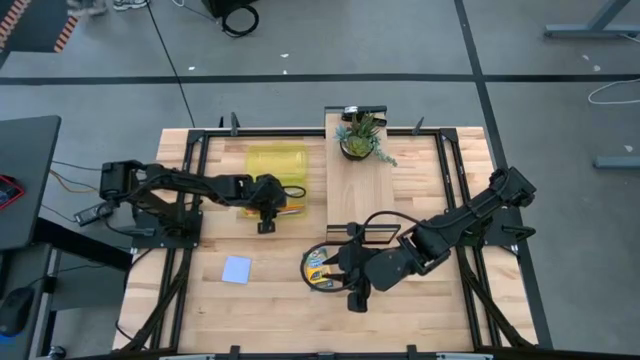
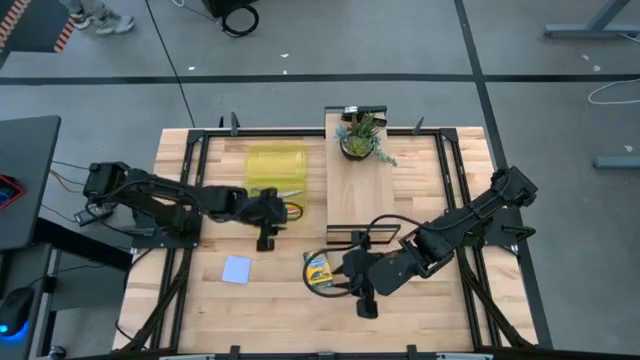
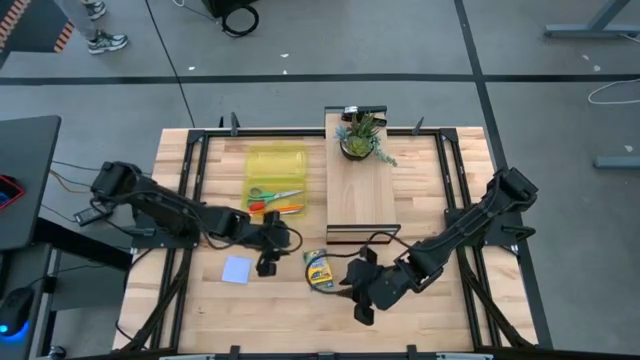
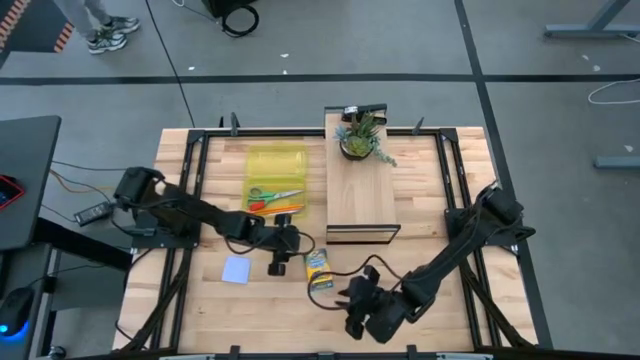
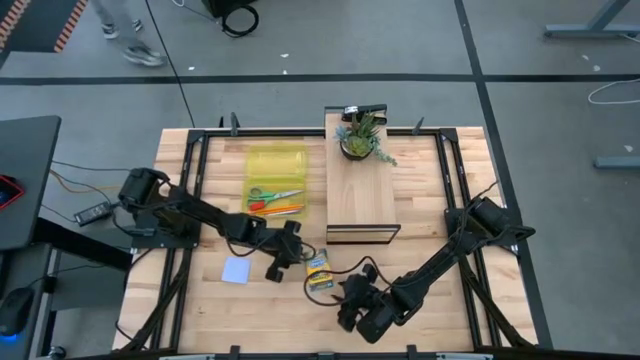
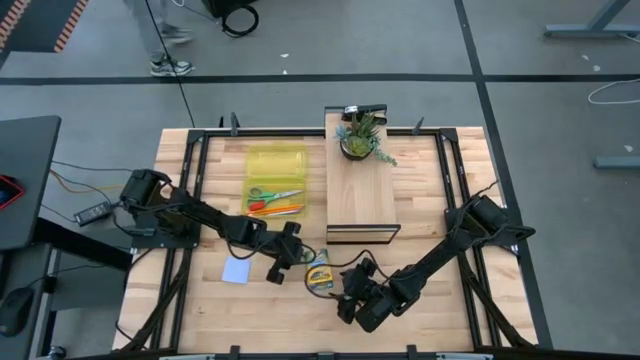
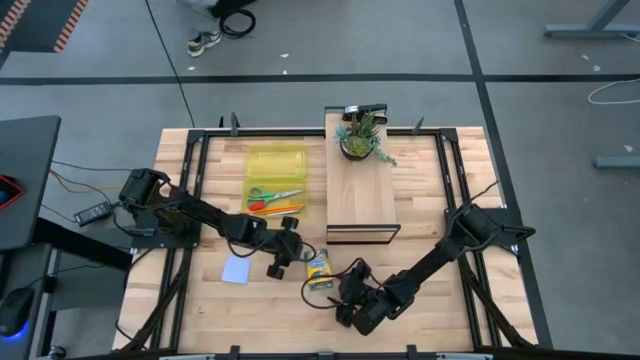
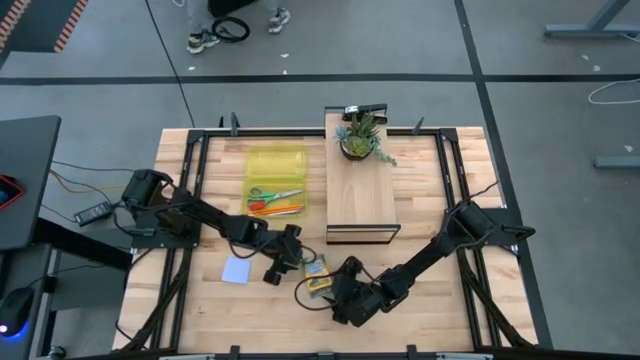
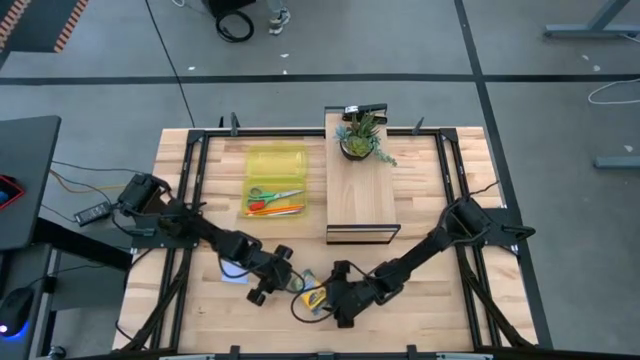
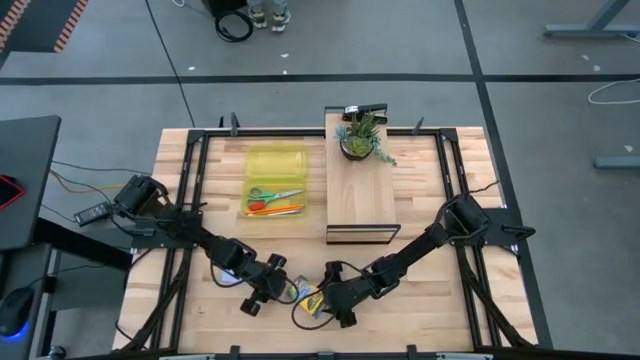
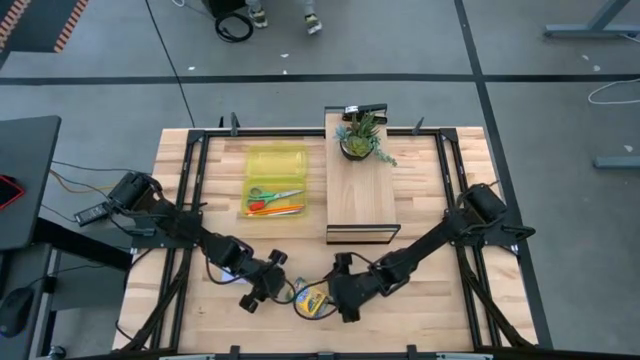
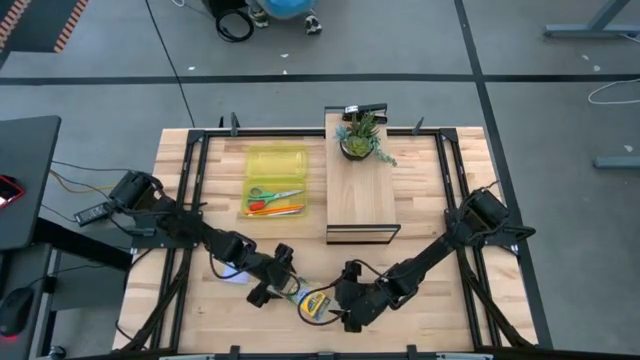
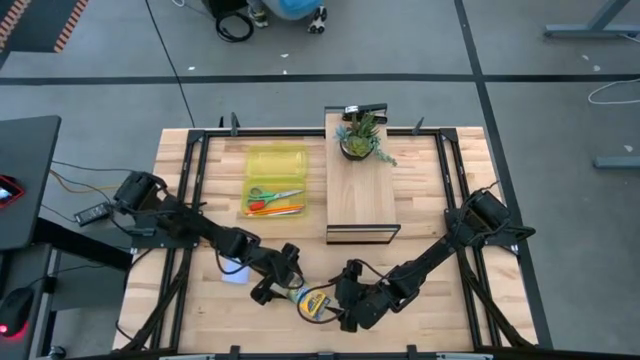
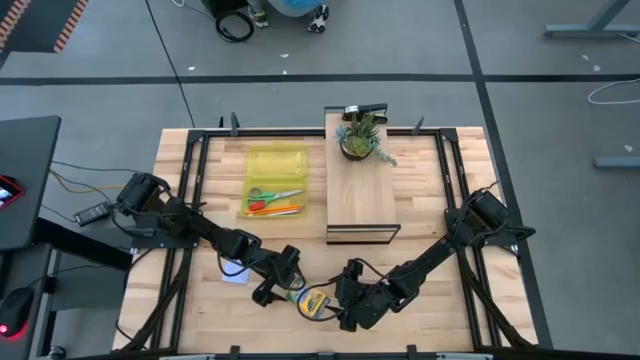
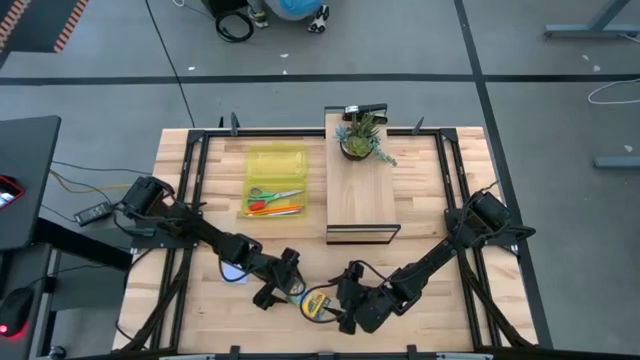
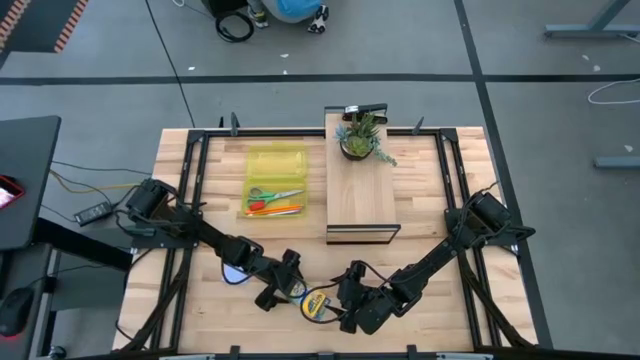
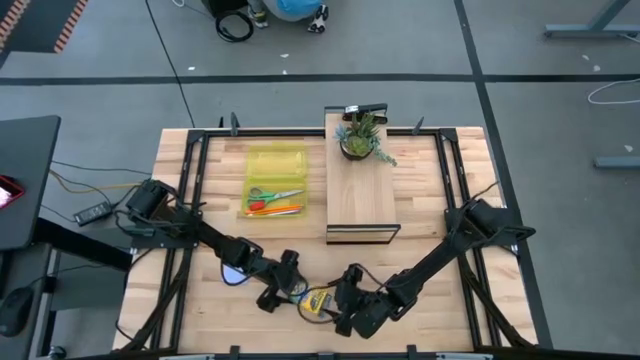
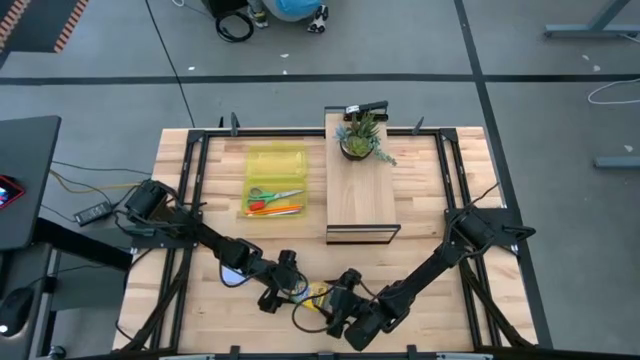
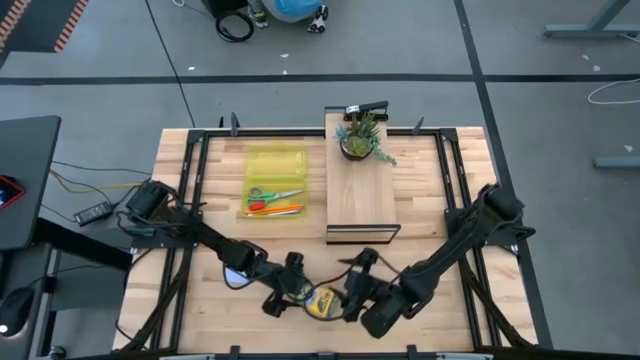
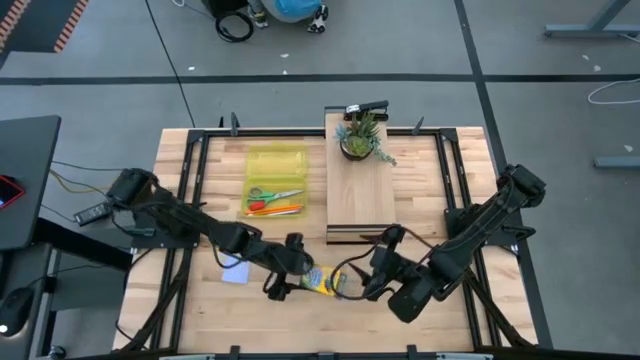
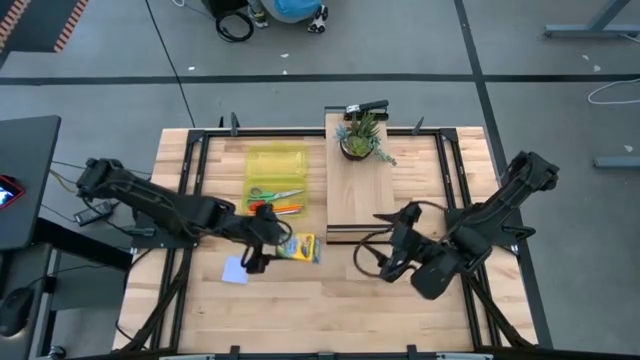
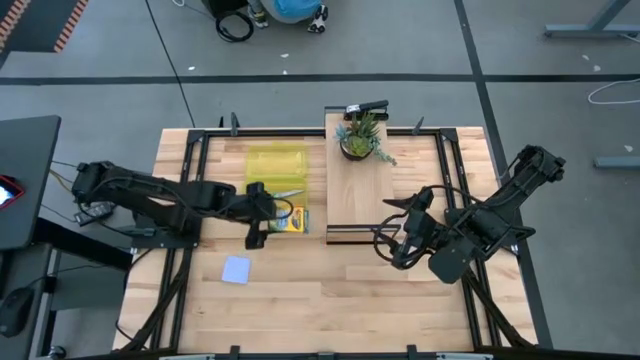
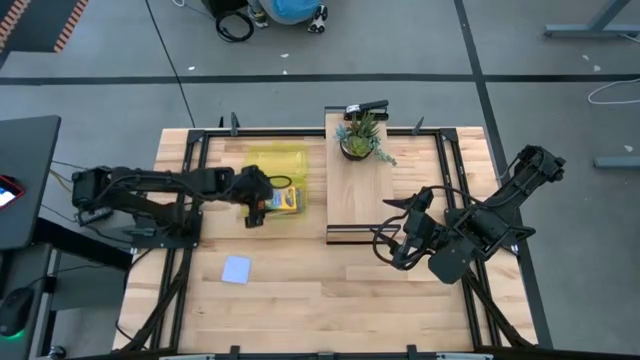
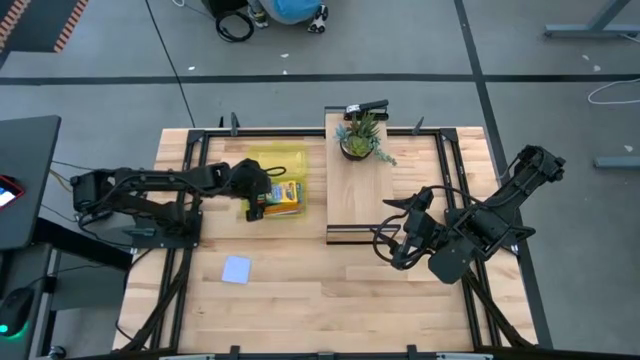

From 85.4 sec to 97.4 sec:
Task: Pack school essentials
Put the yellow crayon box into the yellow supply box

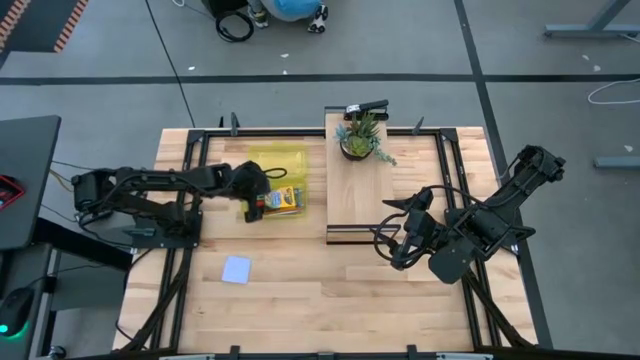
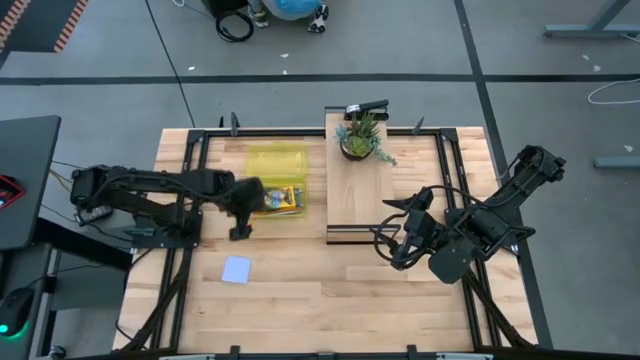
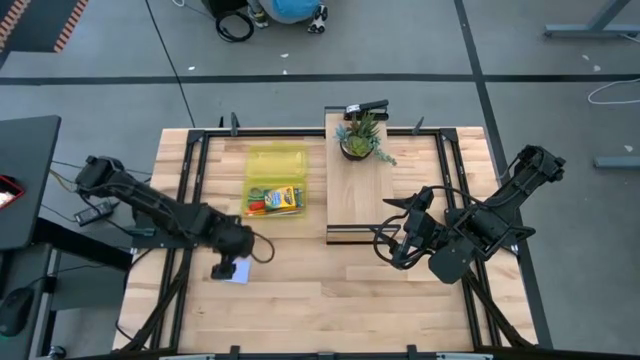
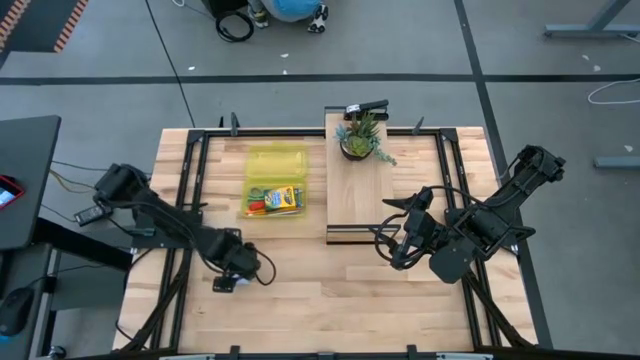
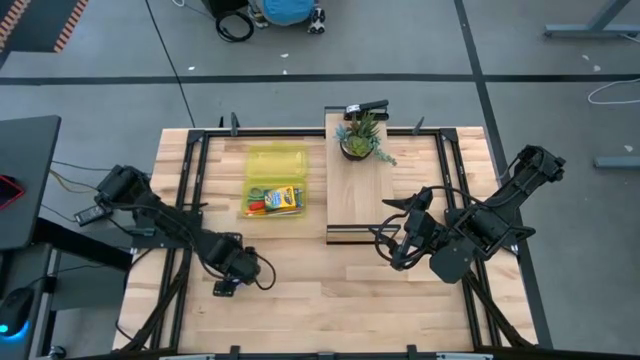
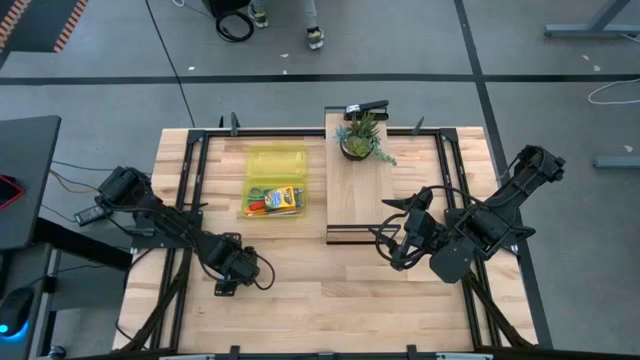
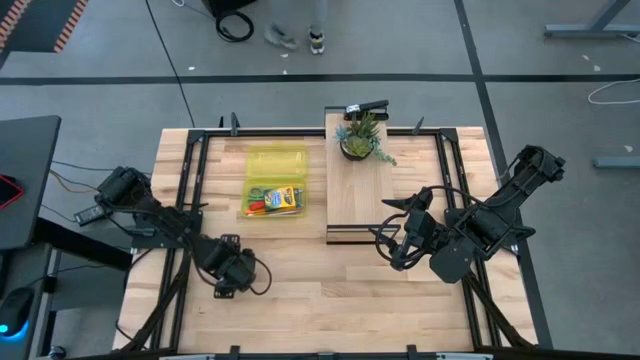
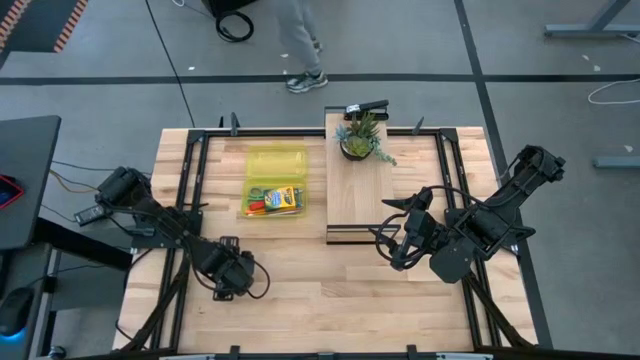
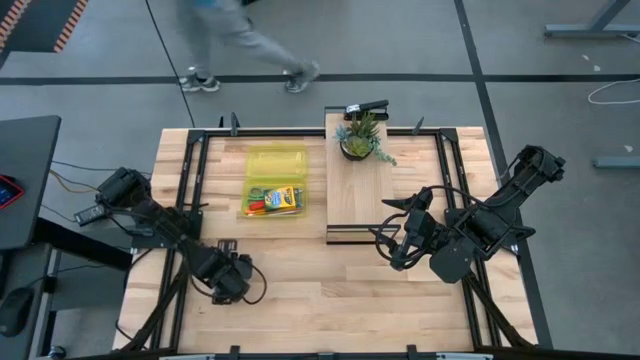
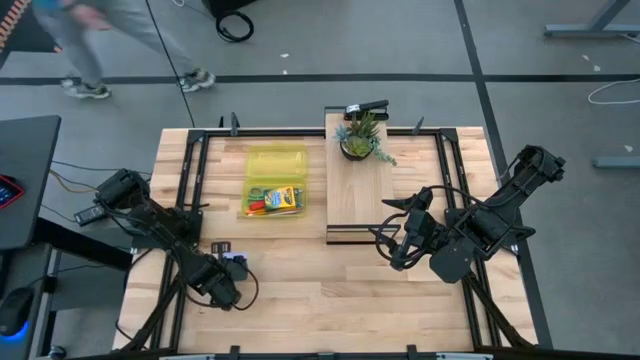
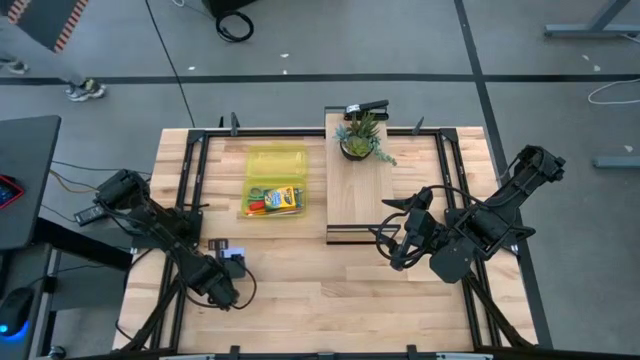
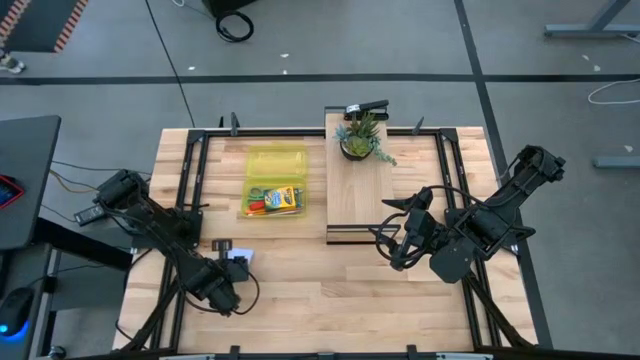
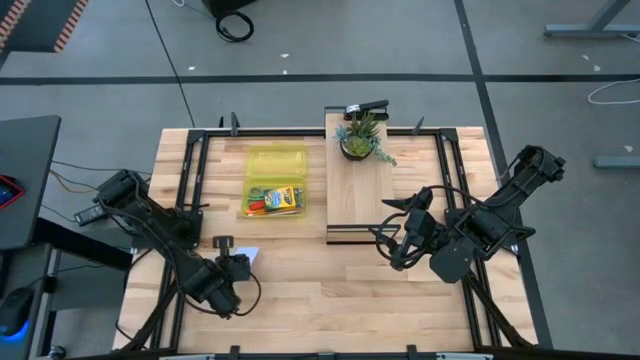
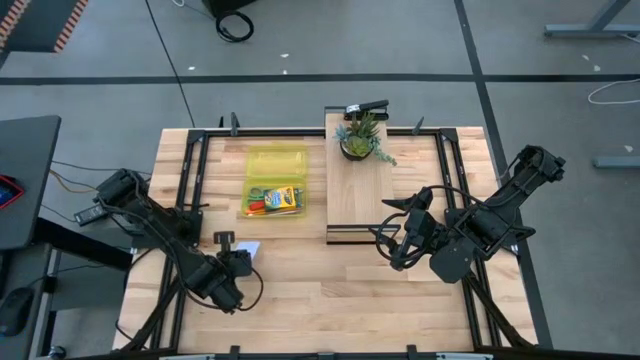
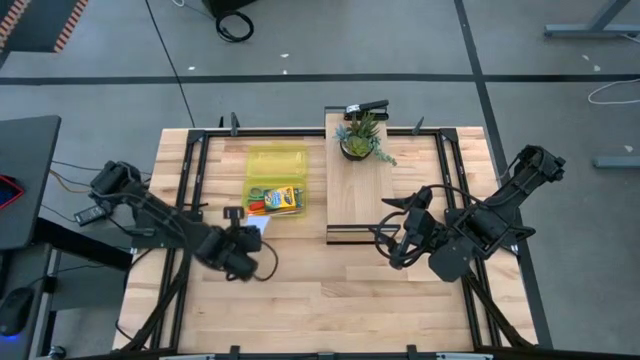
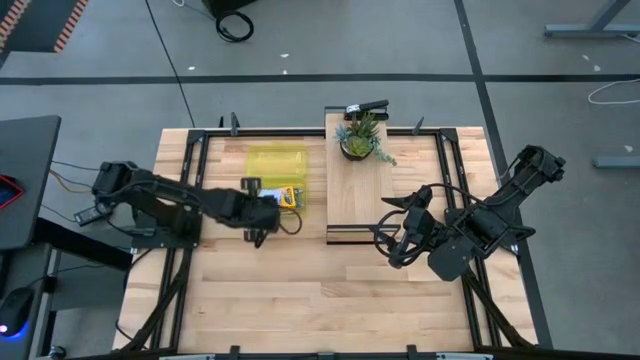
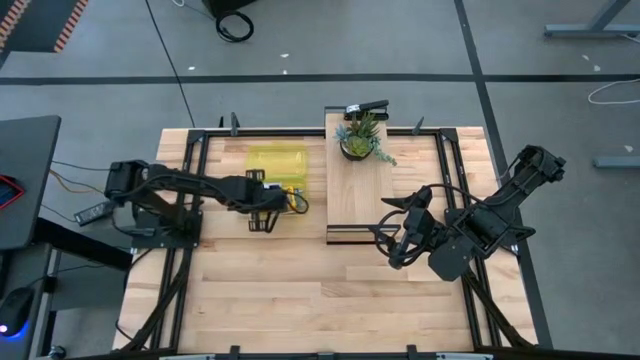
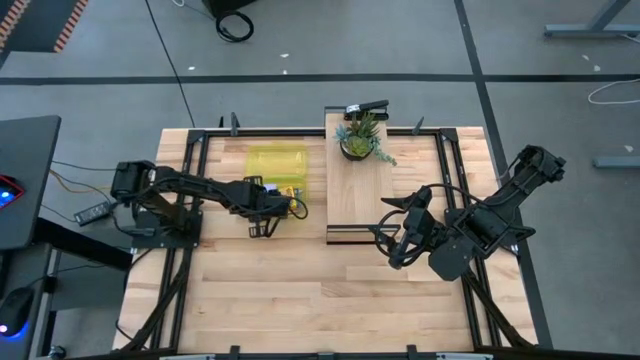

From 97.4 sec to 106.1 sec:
Put the purple sticky notes into the yellow supply box
